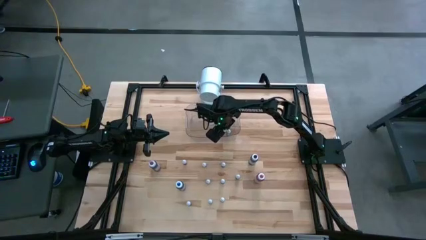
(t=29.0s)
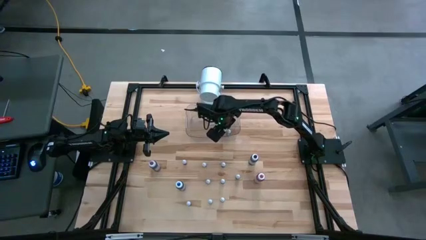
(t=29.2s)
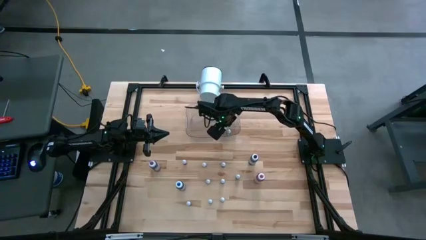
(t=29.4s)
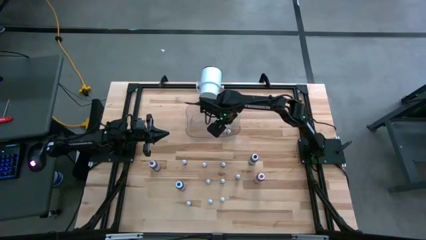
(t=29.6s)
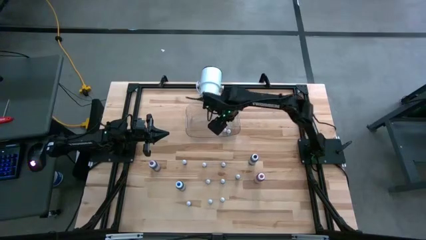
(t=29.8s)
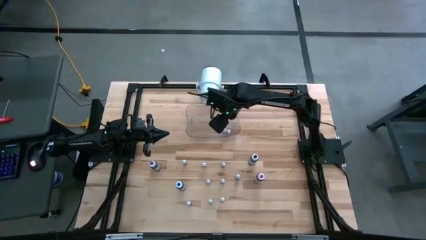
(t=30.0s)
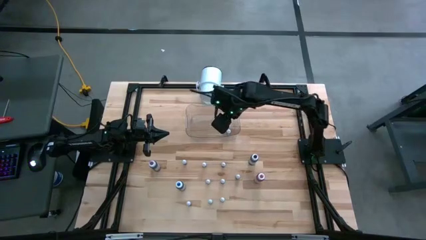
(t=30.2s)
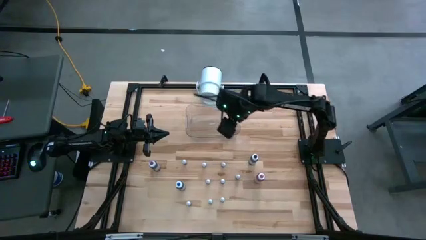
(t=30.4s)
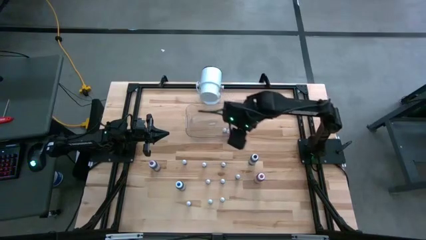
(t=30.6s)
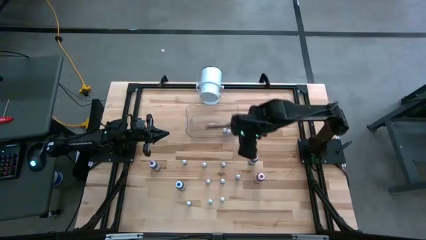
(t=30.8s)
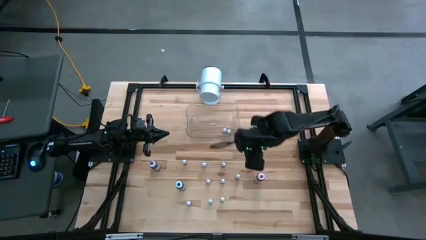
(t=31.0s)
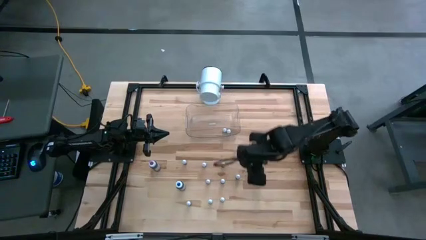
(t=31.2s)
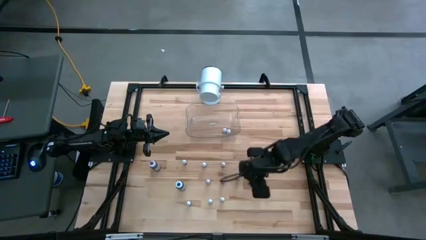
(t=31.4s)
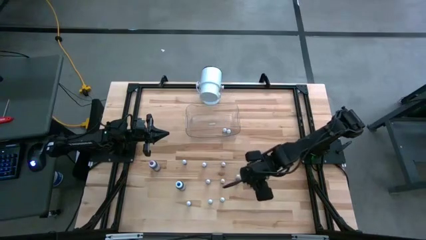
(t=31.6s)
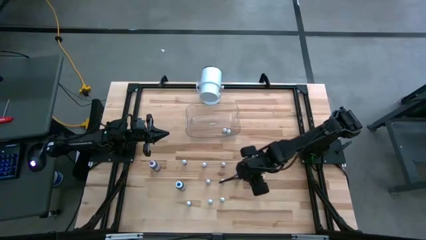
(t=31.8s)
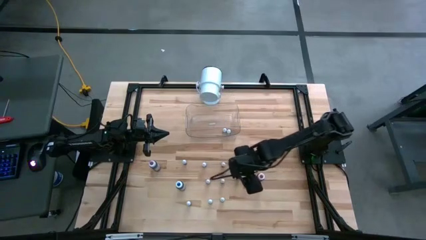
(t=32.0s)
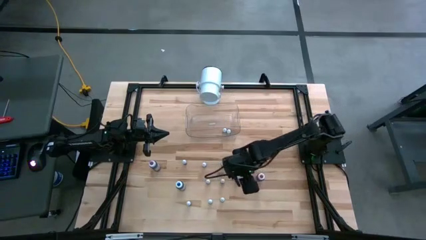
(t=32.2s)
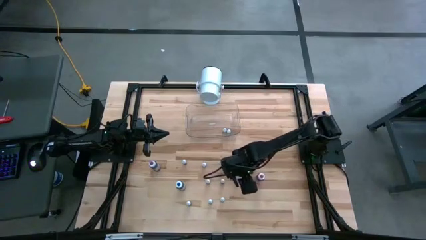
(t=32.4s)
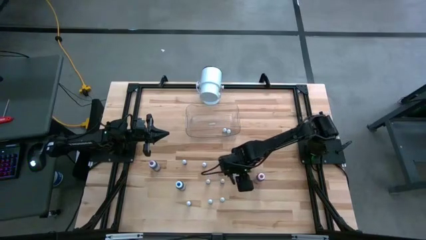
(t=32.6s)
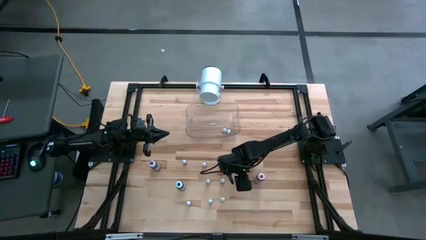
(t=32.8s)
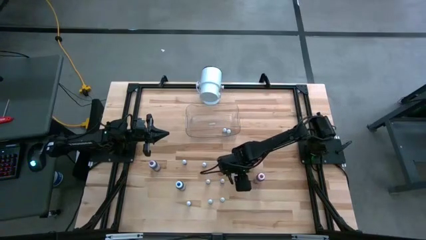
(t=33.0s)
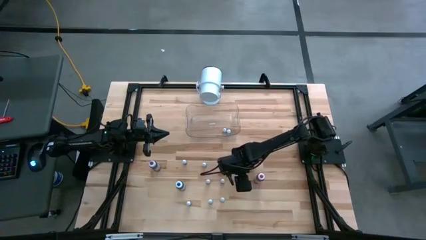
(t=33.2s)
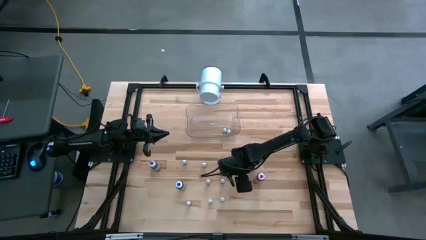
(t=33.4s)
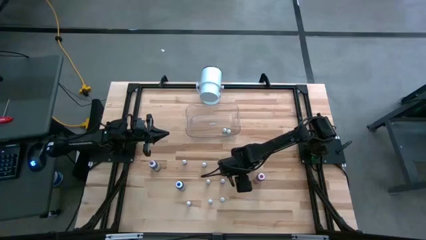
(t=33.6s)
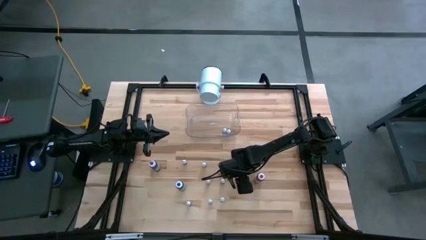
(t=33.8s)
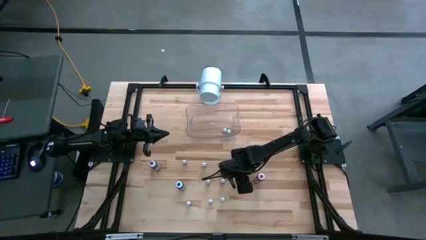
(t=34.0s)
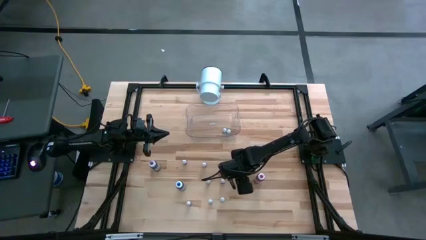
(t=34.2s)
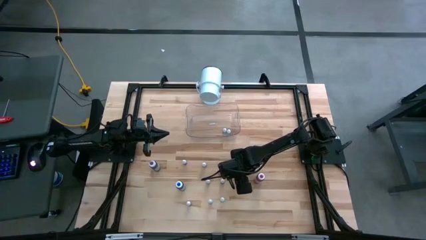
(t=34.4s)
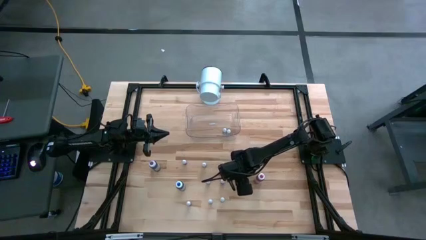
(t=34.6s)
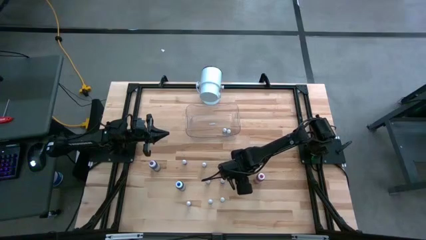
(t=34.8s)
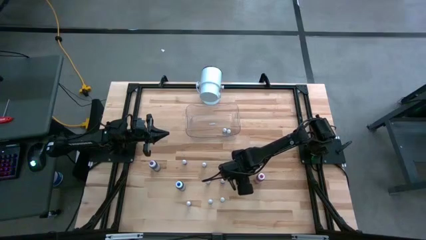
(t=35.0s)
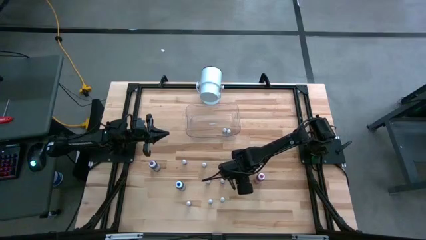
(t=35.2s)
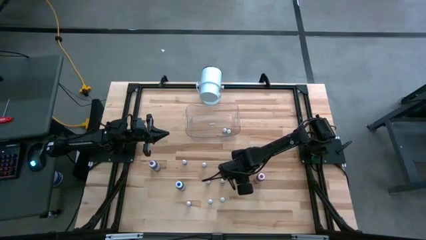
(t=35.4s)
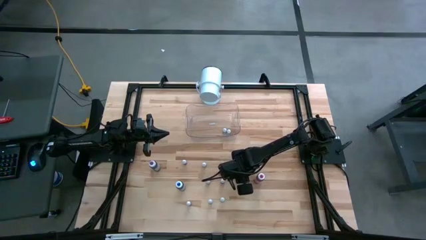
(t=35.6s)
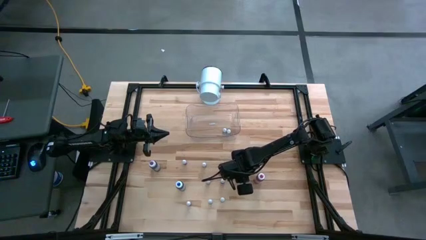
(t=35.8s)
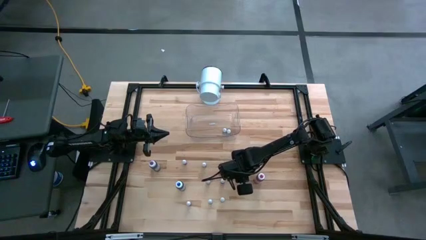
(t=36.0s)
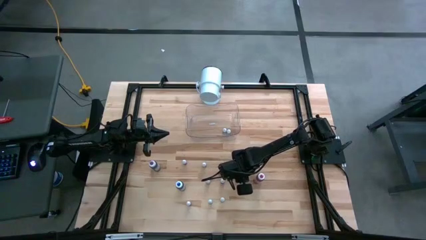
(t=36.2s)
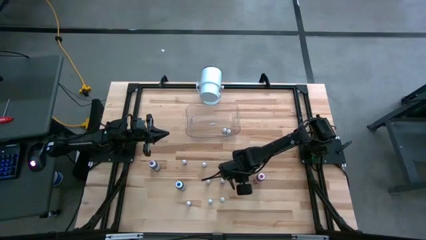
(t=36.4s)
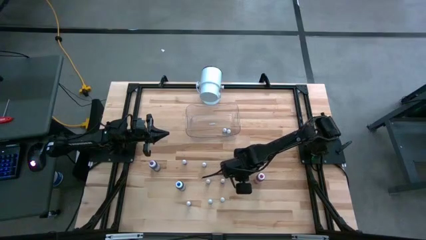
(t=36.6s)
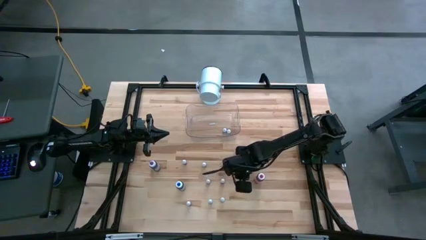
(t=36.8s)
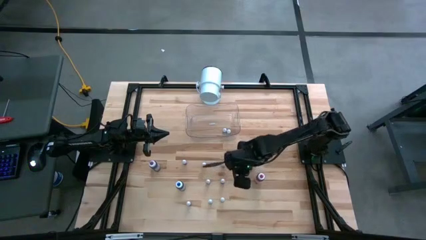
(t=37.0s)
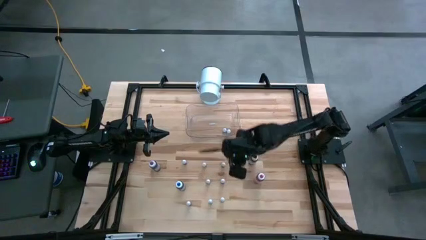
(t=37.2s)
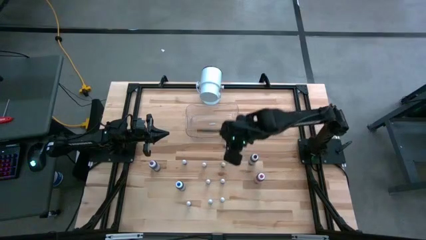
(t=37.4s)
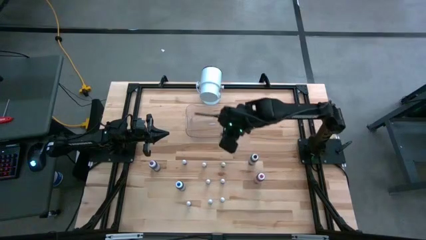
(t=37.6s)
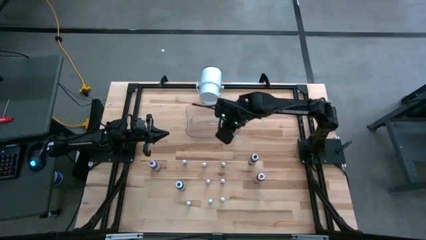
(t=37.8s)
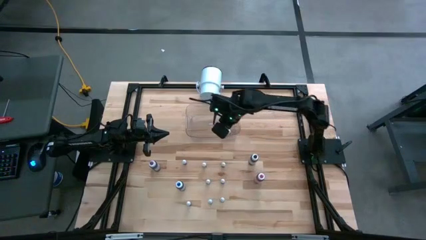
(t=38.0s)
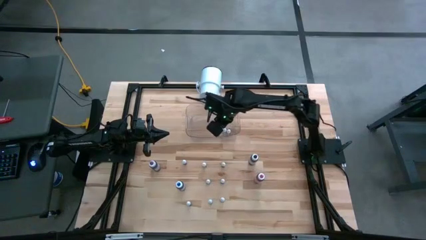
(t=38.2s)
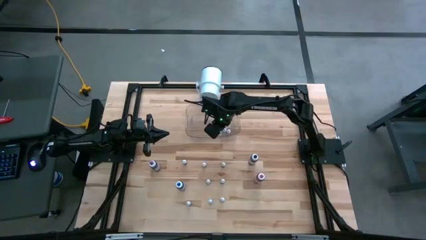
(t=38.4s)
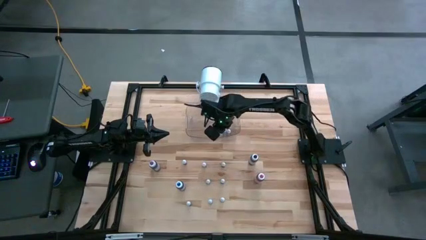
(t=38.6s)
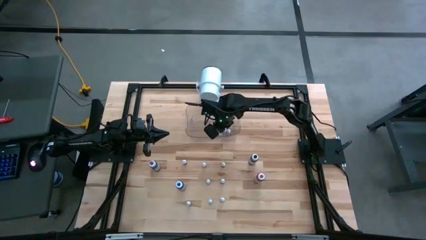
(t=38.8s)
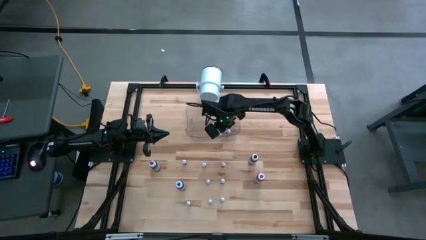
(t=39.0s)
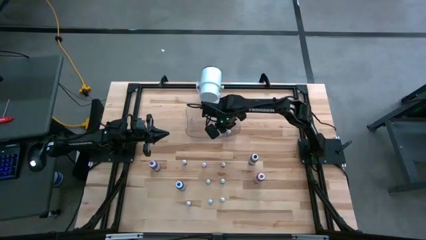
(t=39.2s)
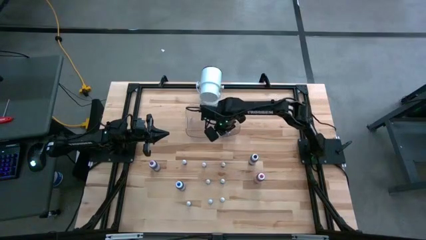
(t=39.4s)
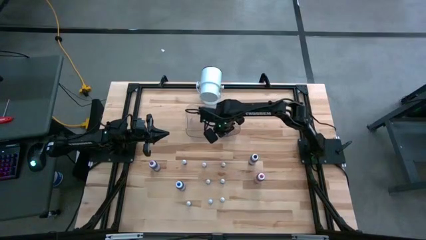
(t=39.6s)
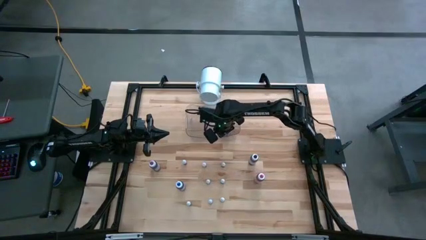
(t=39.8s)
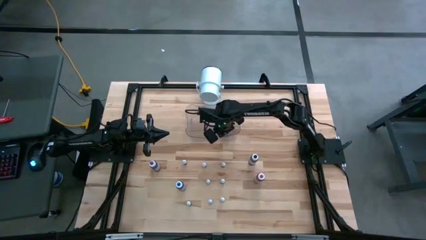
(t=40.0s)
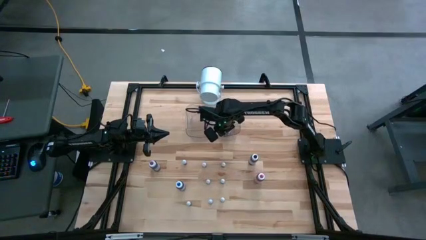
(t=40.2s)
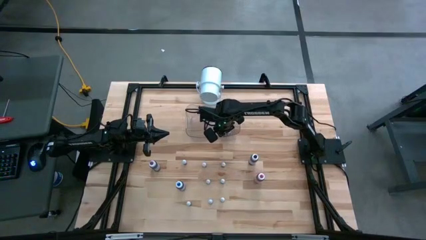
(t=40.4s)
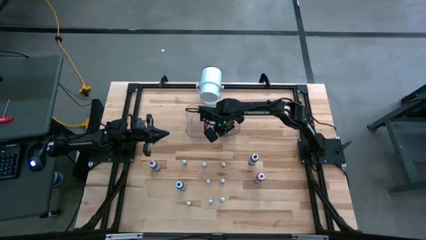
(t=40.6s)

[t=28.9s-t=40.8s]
Task: Pick & Place food coloring
Put the top small green food coloring bottle into the transparent bin
